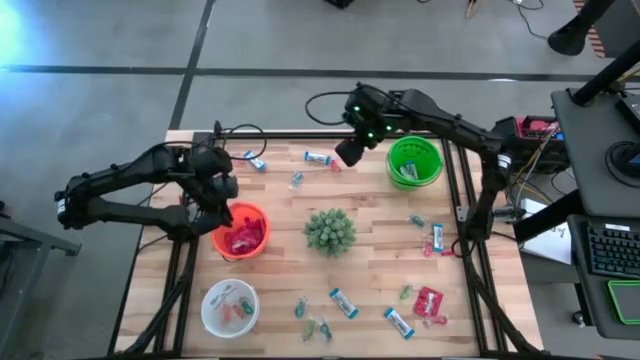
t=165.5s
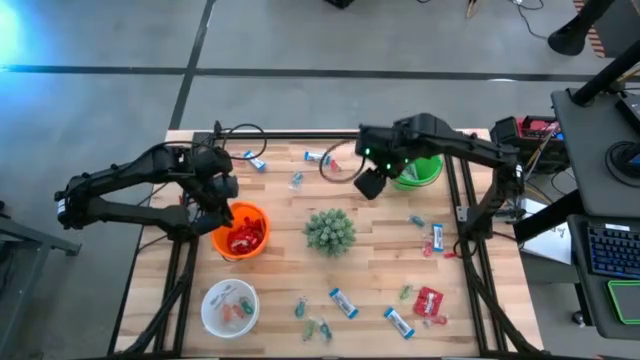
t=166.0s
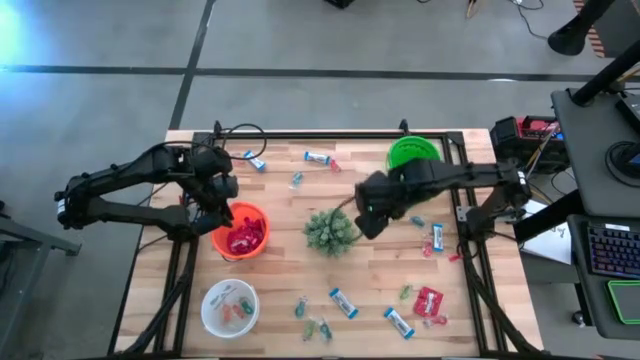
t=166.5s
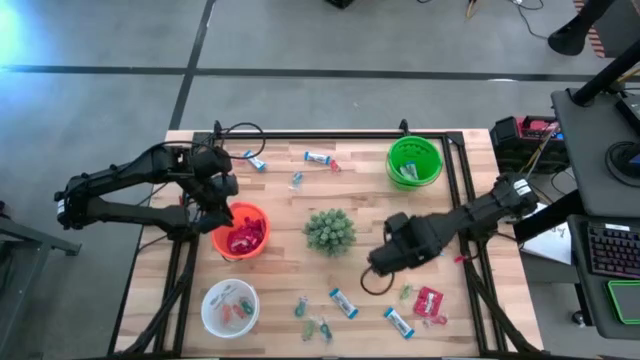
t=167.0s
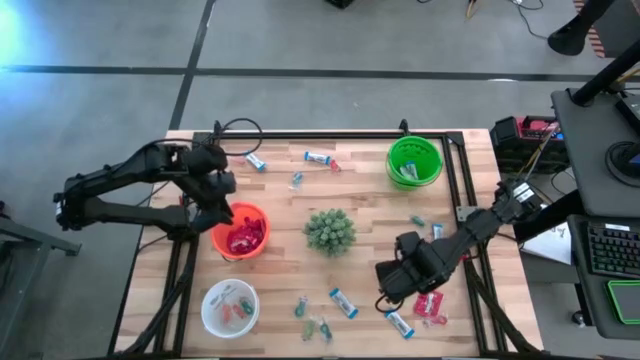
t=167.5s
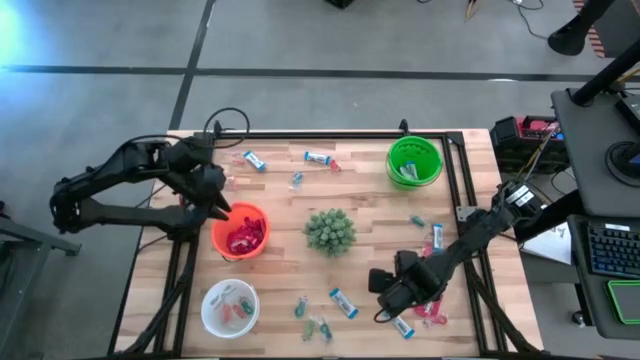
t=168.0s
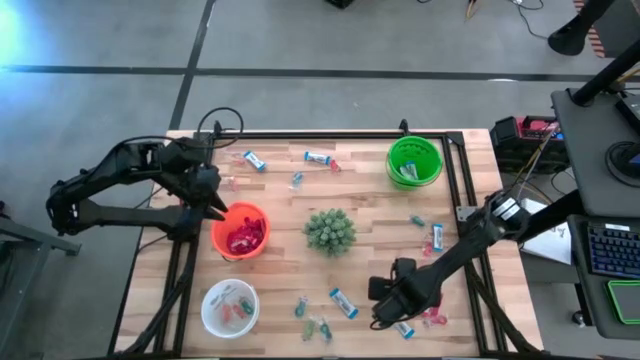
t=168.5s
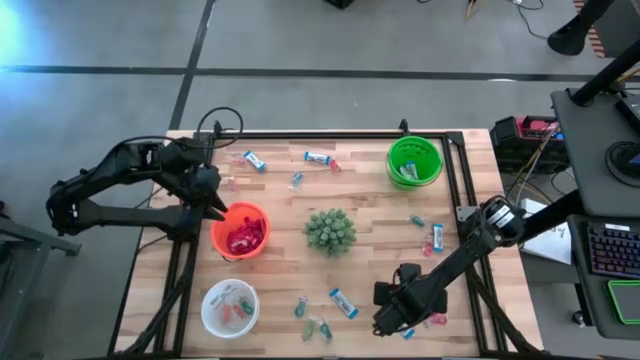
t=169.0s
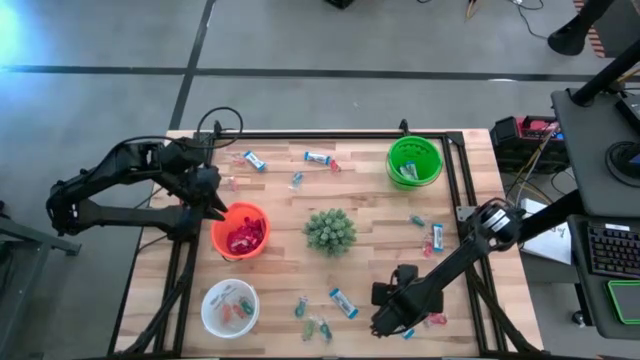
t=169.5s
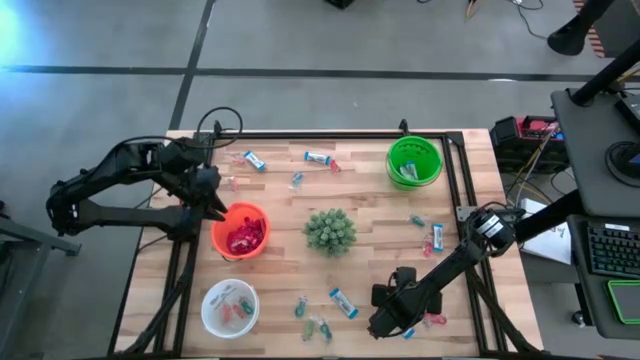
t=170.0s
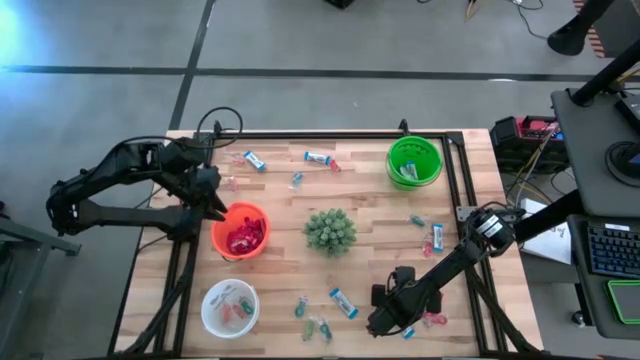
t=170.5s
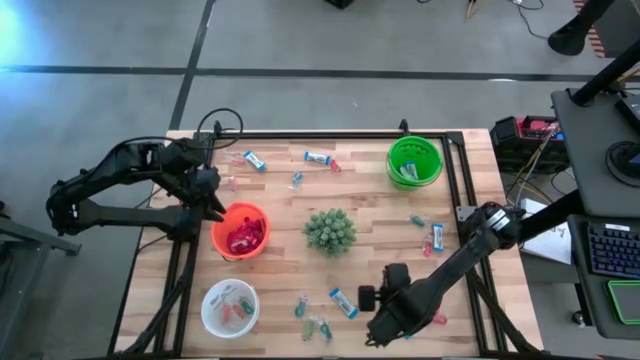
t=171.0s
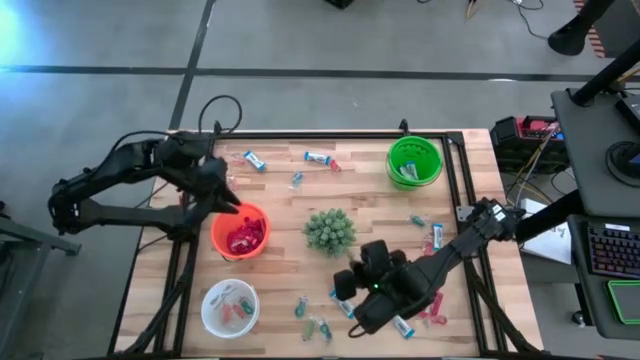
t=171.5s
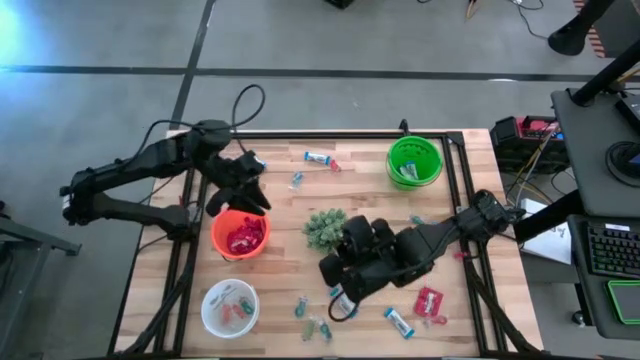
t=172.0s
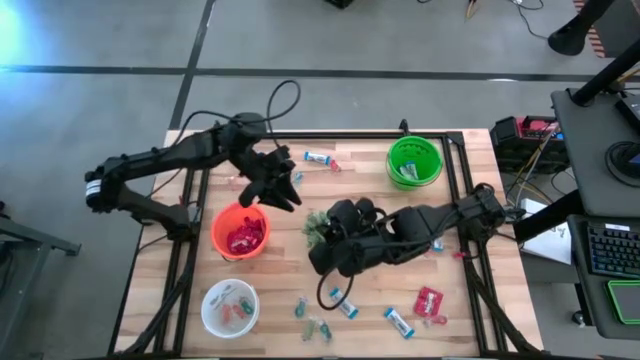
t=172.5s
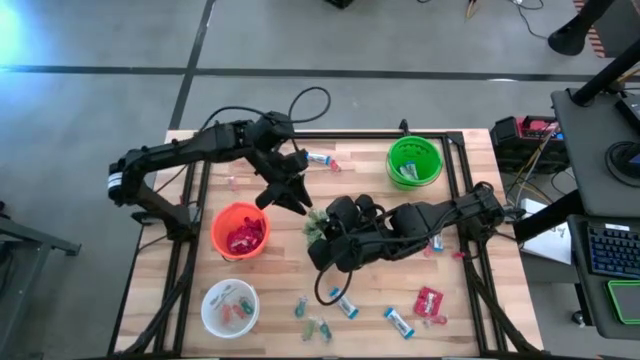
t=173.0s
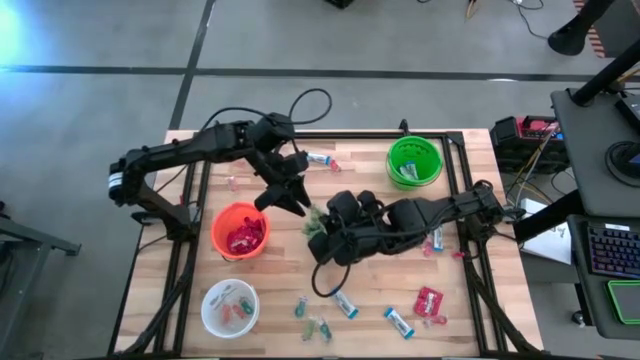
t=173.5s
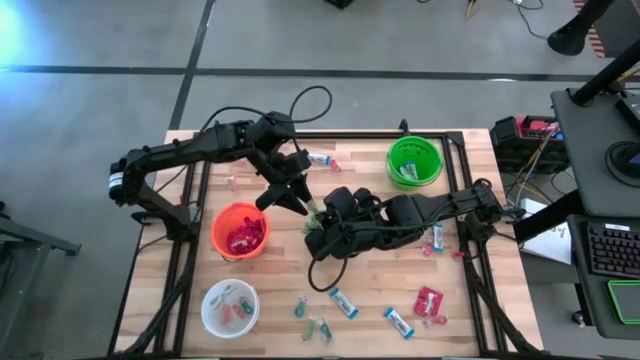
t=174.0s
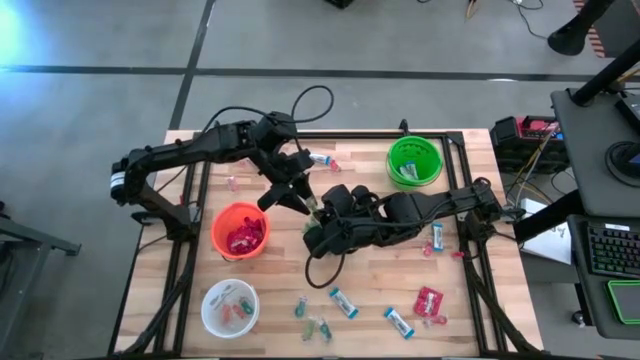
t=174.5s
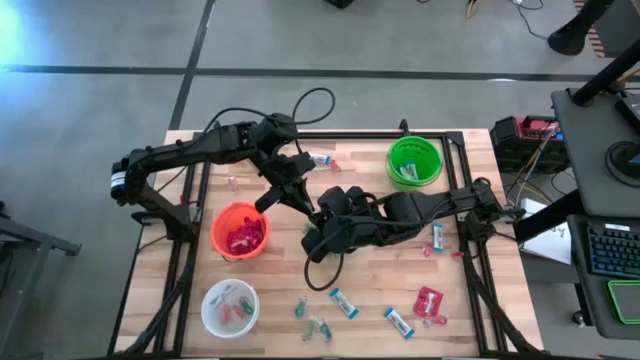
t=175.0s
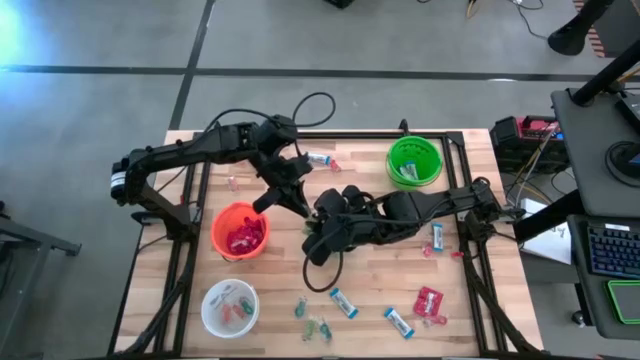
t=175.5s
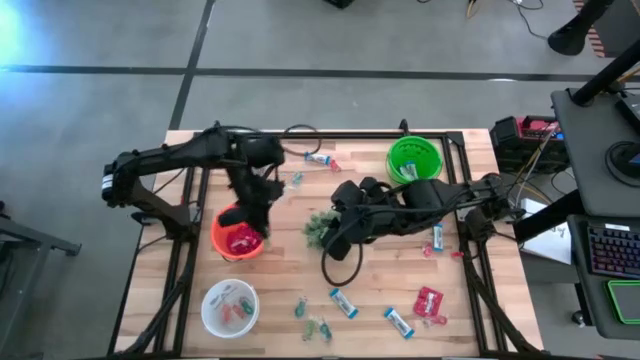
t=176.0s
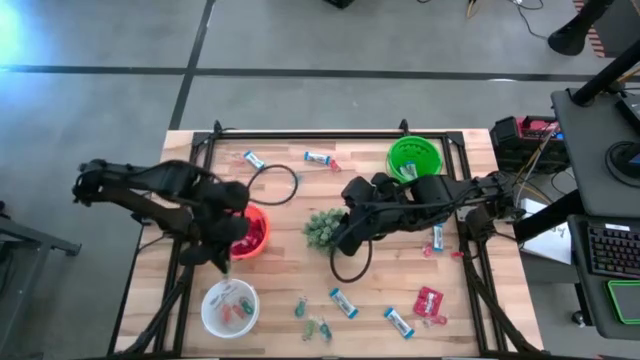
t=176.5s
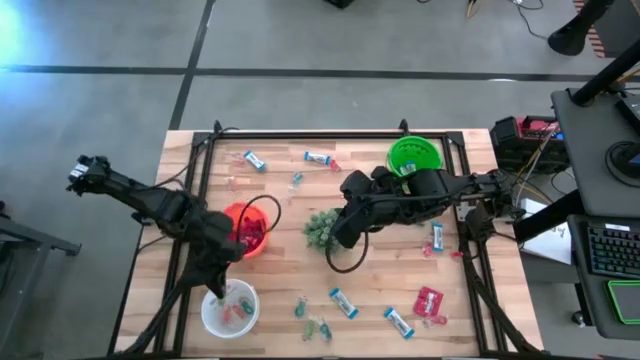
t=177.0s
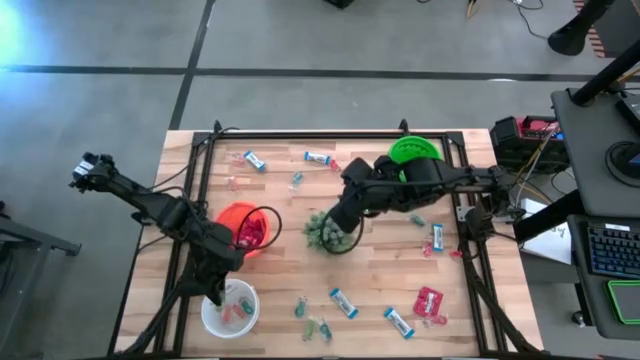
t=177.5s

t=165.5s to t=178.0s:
Task: Sort candy
Put the green gummy into the white bucket

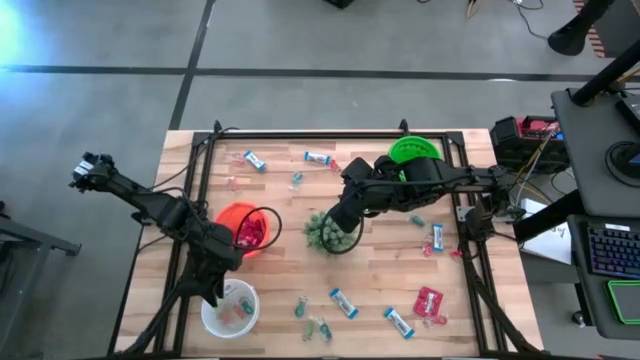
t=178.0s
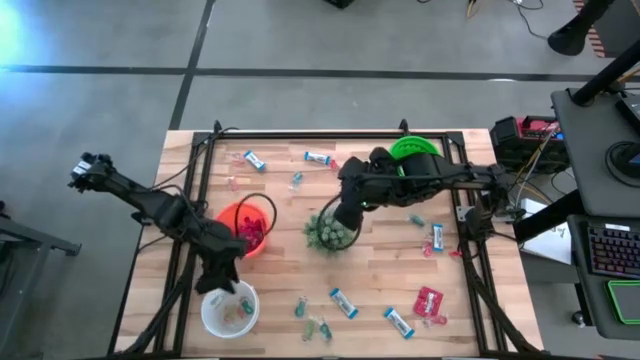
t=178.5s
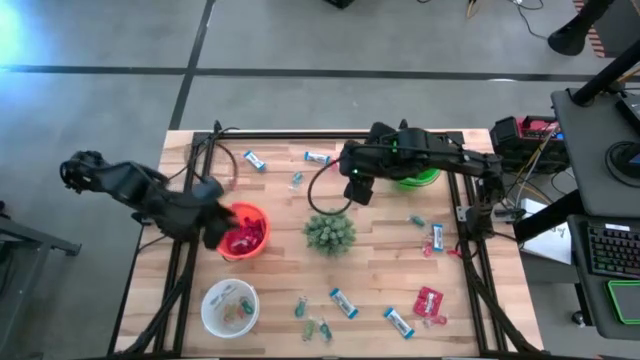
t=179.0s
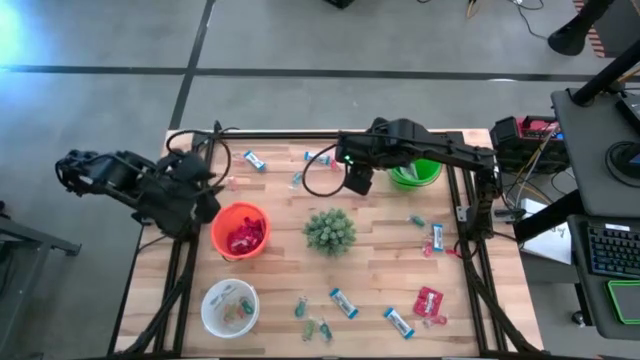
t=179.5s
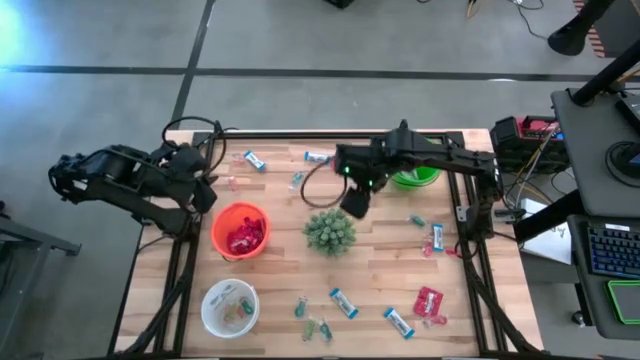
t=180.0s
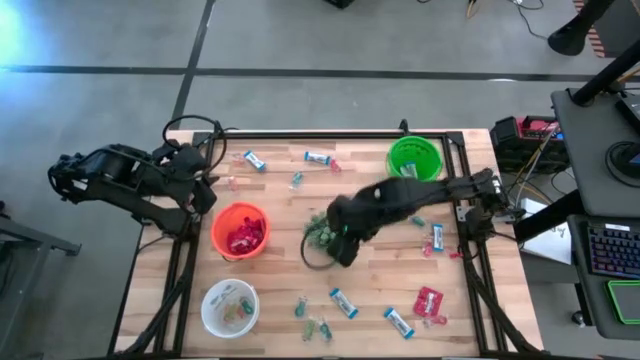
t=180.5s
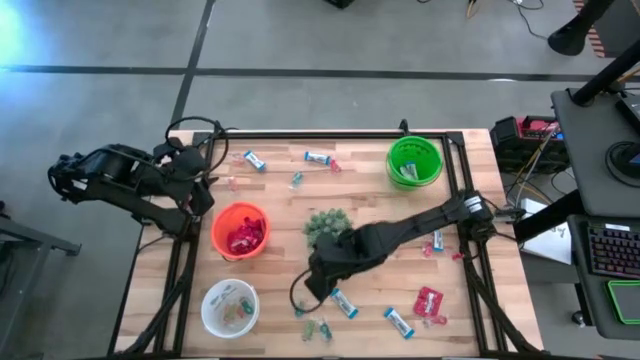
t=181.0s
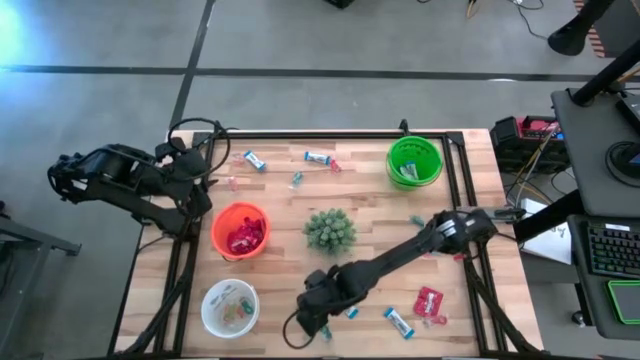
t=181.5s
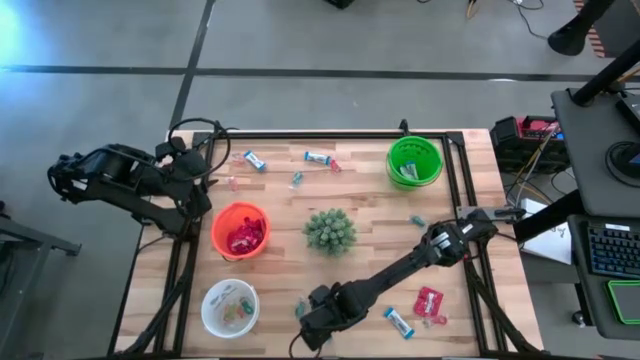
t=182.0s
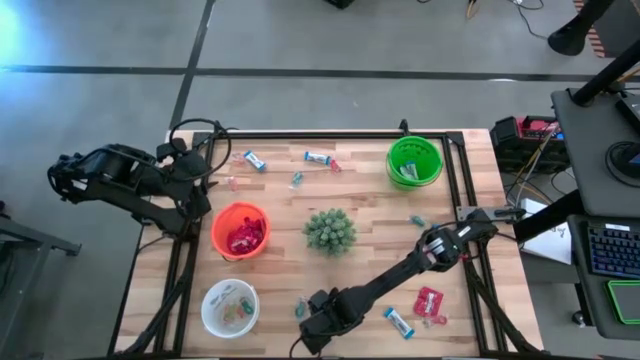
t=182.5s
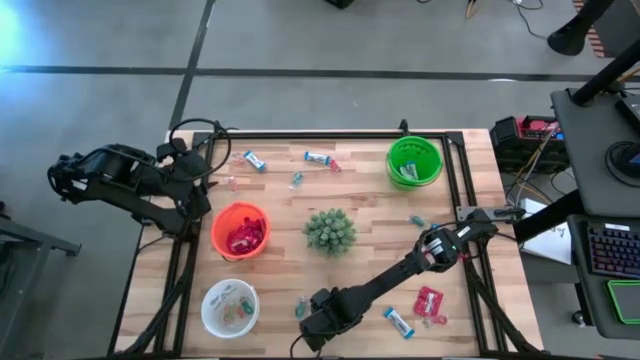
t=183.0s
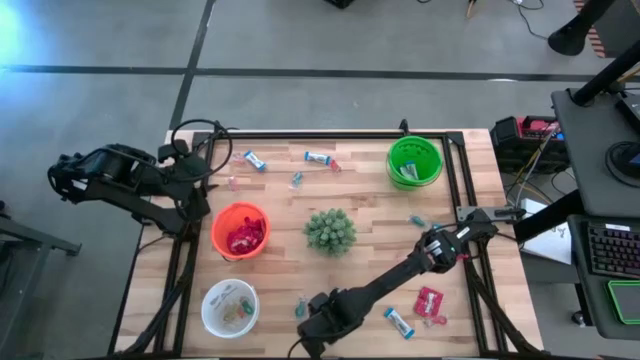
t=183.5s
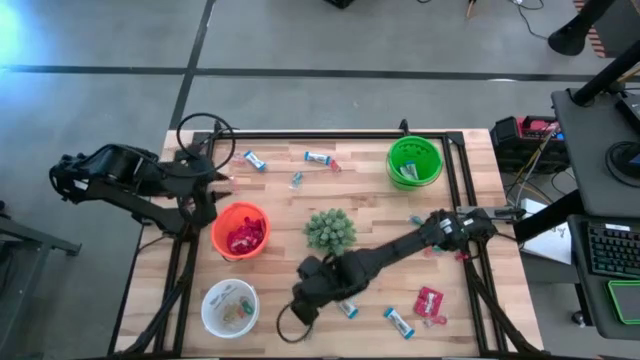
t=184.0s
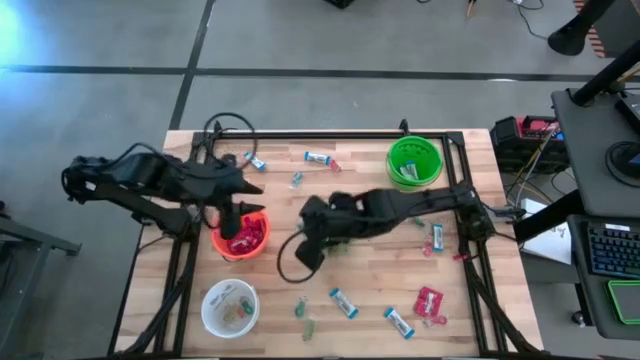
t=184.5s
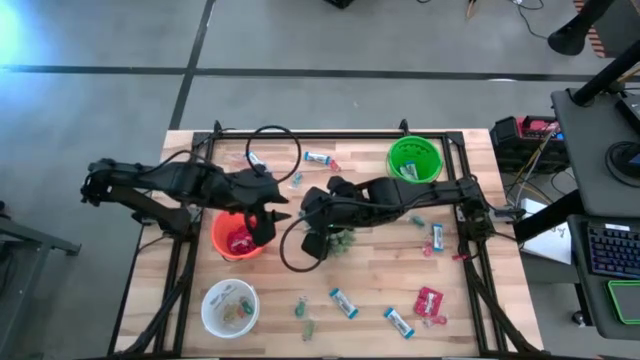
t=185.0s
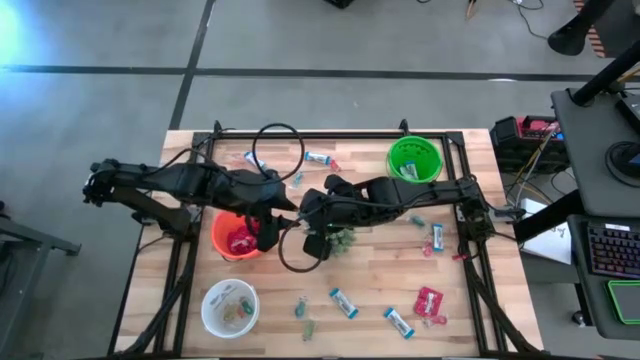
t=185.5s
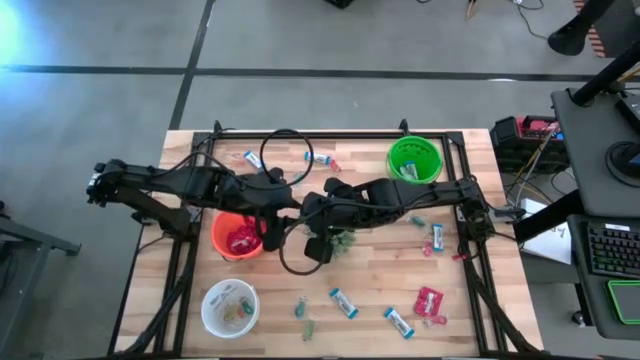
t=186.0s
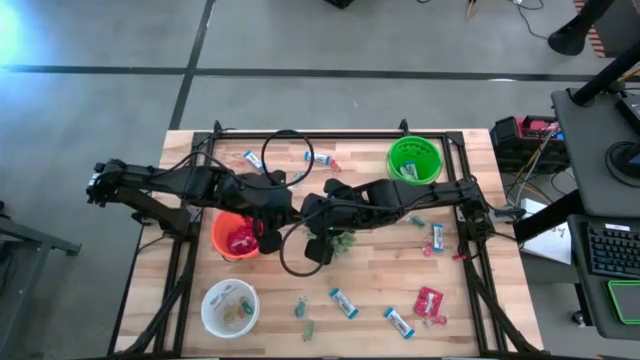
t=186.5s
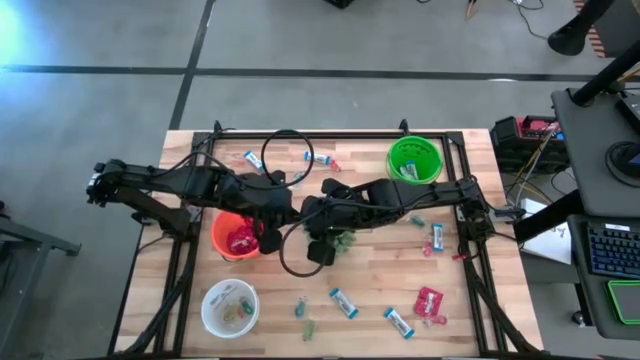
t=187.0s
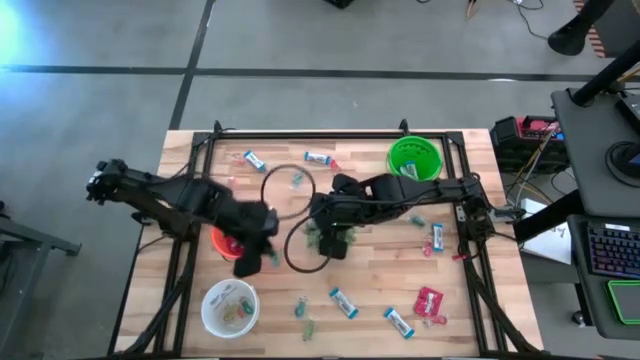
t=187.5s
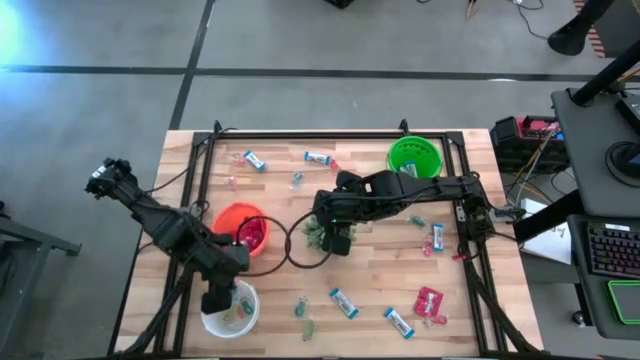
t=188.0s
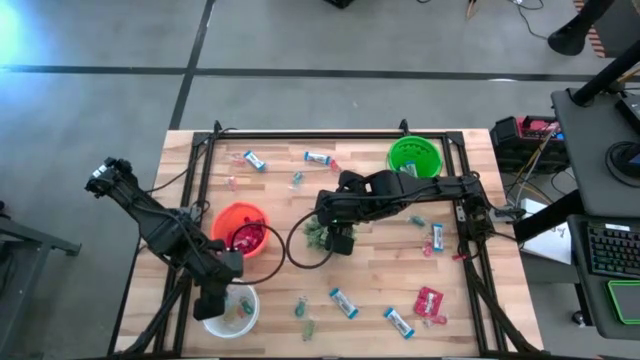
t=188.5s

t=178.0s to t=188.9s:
Put the blue gummy into the white bucket
